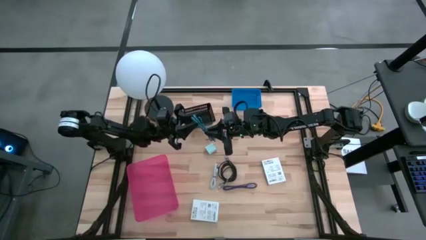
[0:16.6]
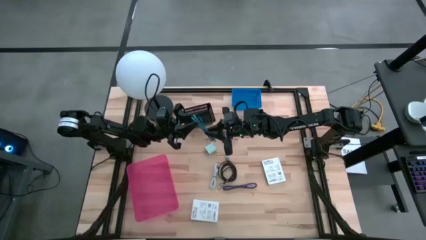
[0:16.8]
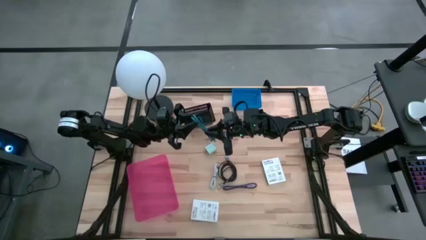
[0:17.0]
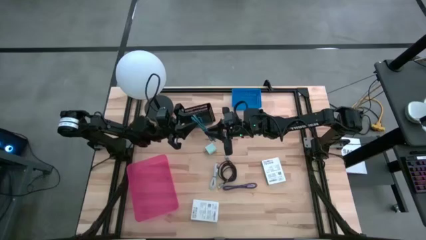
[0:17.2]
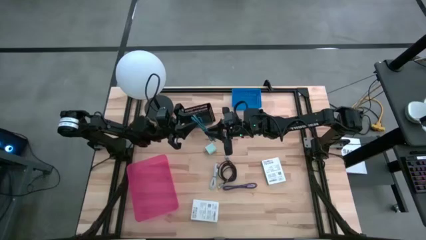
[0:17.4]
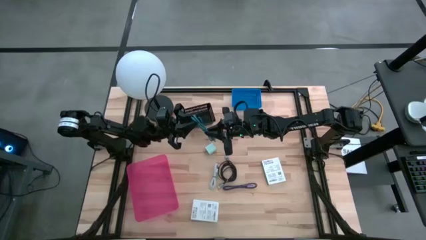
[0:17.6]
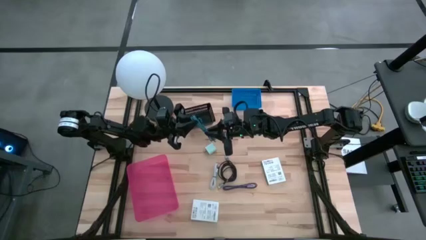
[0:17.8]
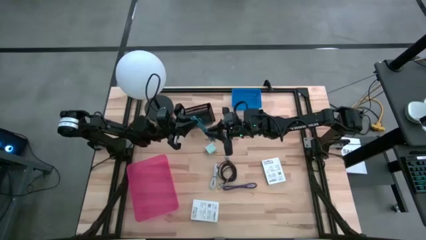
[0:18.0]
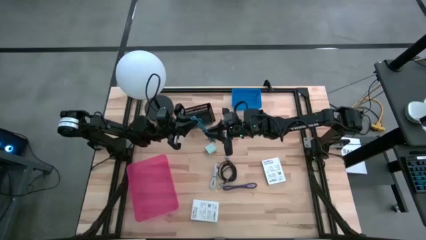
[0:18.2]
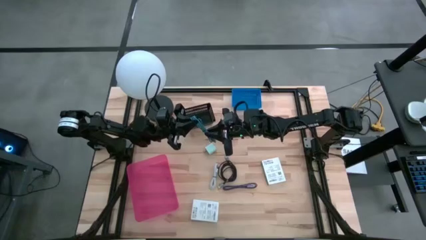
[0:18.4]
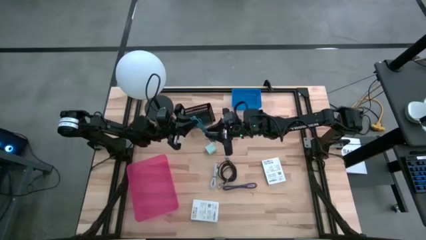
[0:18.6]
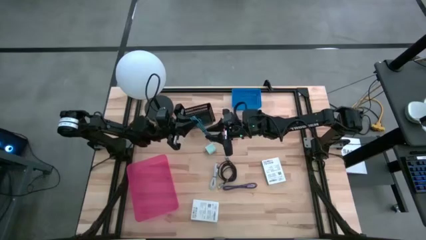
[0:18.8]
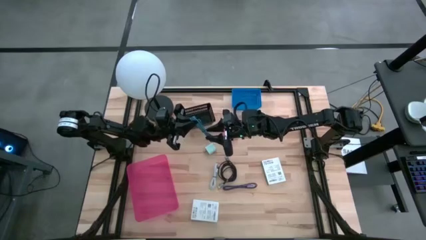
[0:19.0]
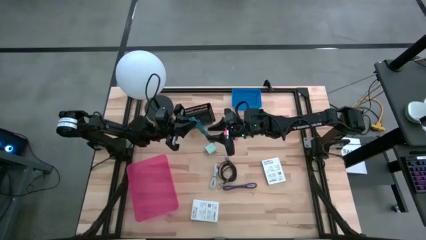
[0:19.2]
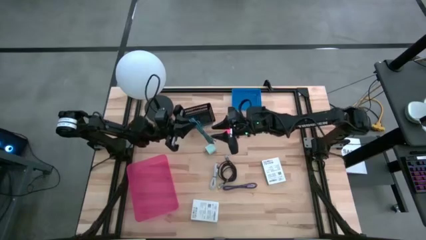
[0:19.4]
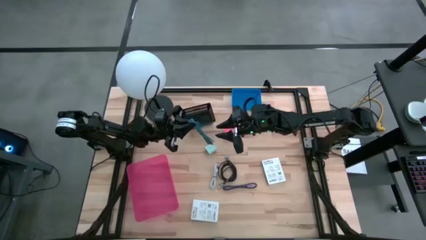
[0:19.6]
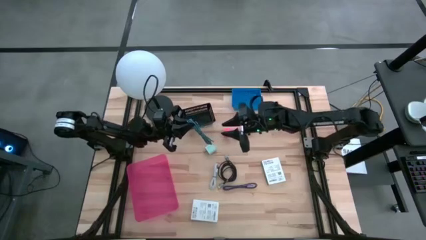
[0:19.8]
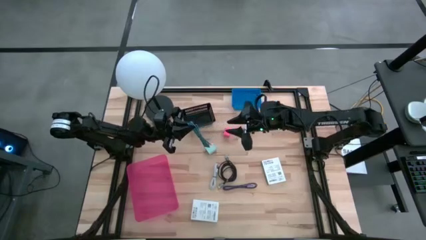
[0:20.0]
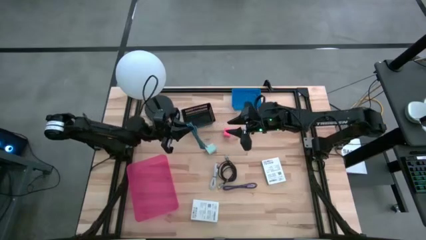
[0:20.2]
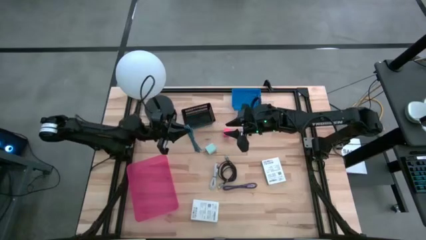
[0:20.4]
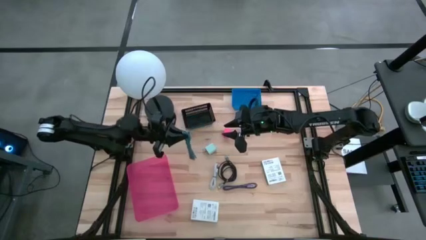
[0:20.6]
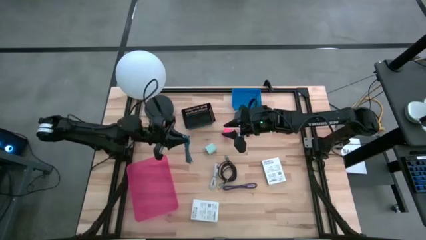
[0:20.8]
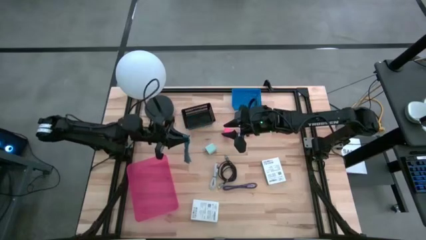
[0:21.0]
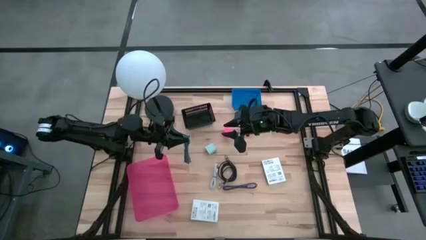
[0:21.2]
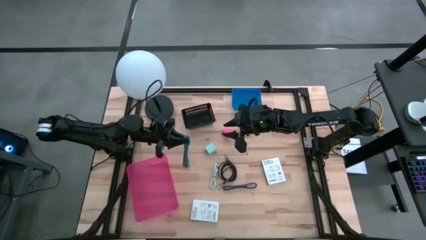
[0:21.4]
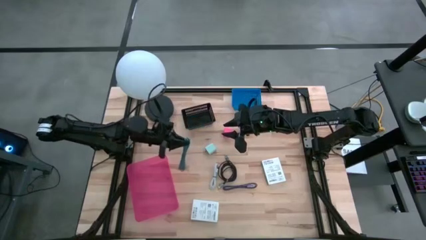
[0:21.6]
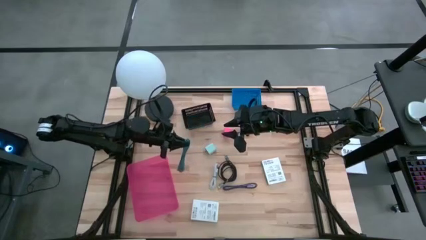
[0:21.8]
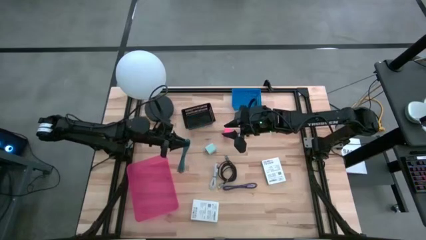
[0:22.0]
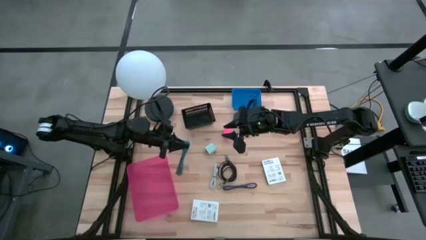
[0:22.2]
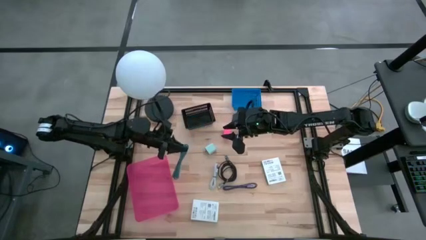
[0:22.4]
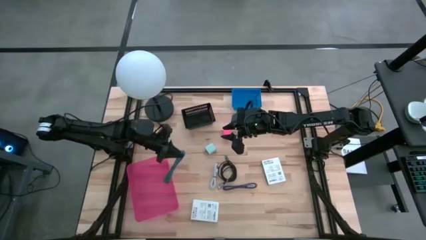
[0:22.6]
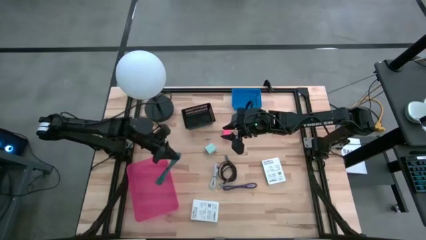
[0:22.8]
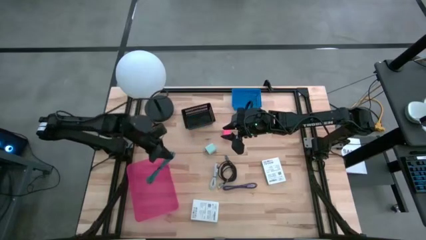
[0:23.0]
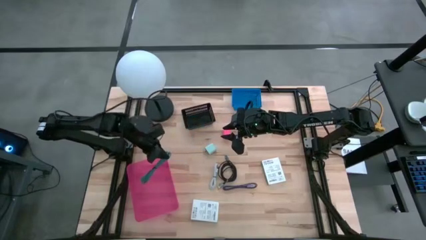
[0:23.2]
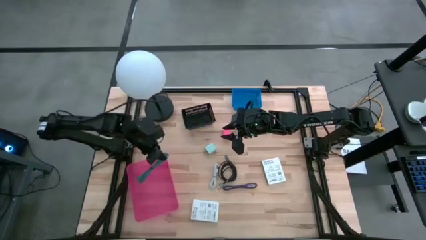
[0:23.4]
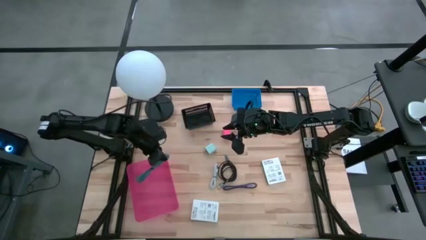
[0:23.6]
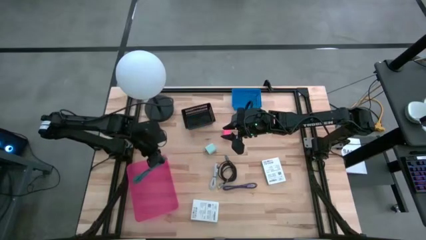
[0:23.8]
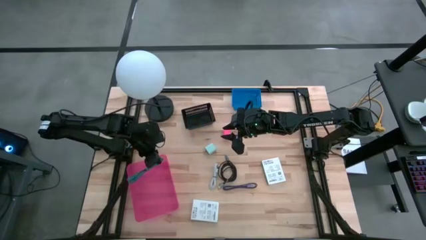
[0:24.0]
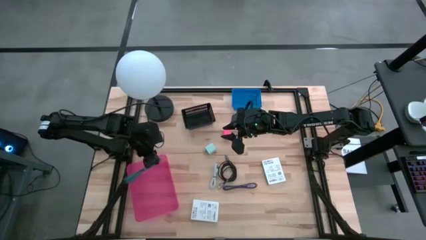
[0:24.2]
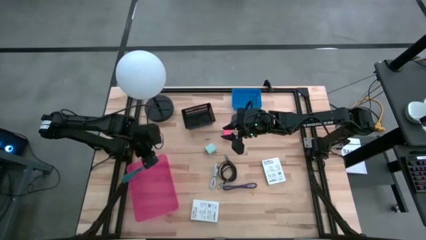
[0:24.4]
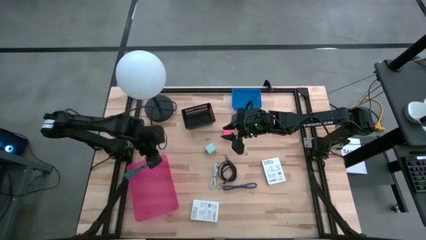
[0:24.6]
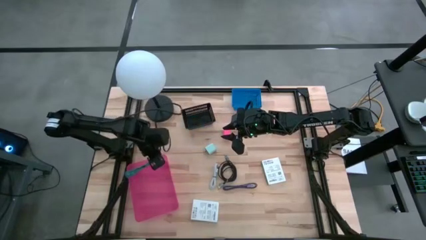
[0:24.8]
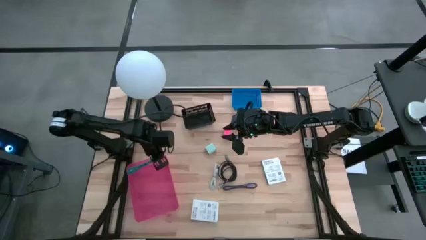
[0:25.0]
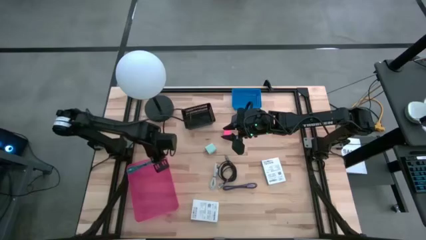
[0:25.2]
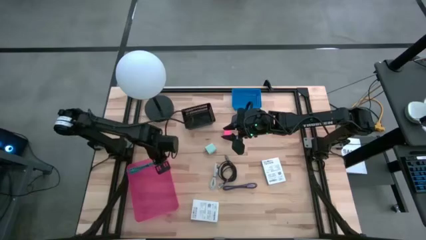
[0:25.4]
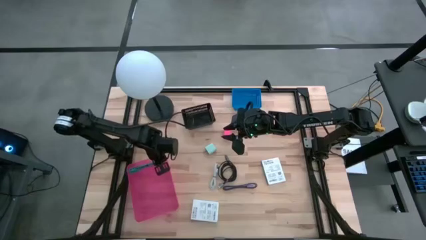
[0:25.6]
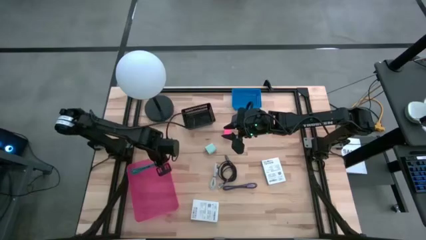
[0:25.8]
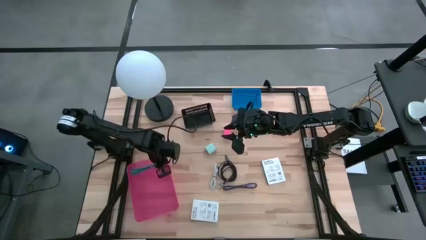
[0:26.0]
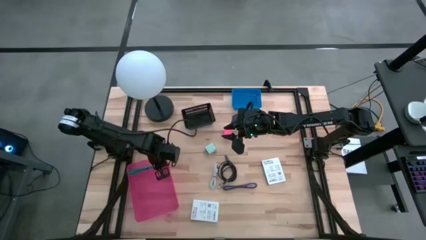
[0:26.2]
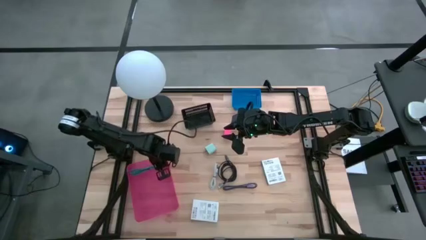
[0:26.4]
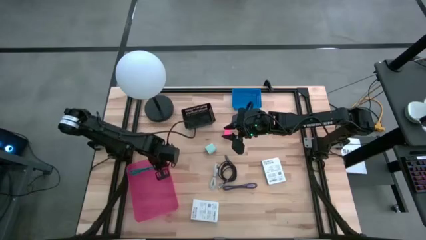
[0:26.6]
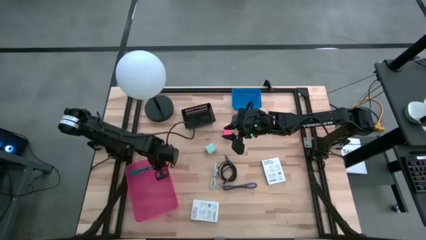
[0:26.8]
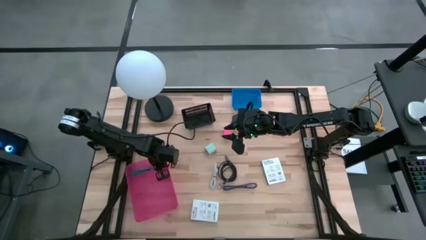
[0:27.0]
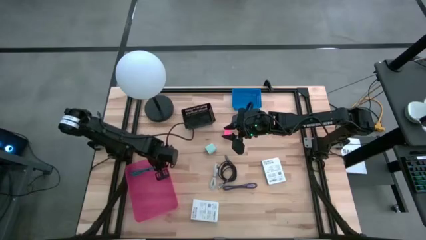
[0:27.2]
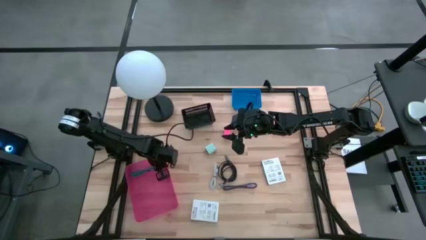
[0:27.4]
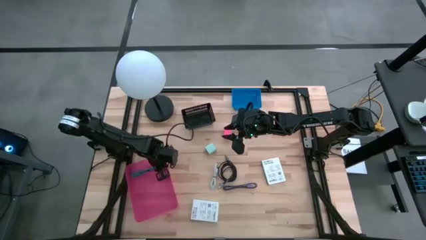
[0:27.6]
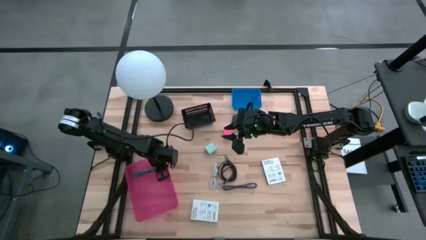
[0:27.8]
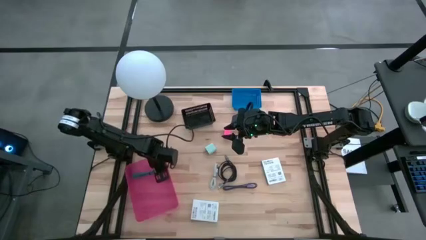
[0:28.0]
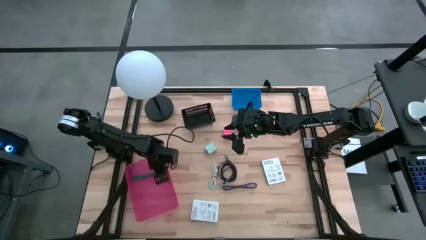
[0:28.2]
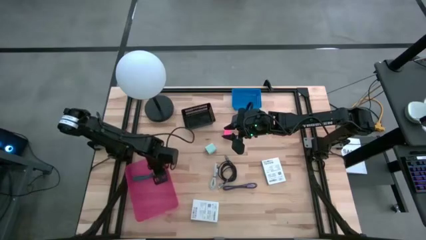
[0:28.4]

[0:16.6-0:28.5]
Task: Pick and place items into bin
Put the blue patterned charger cable into the light pink bin
